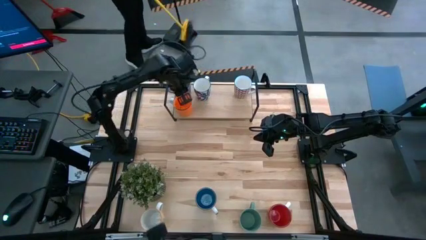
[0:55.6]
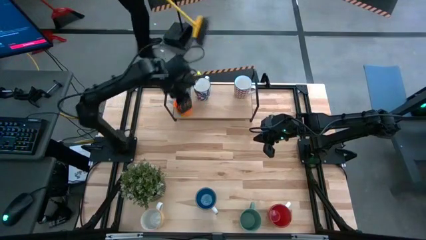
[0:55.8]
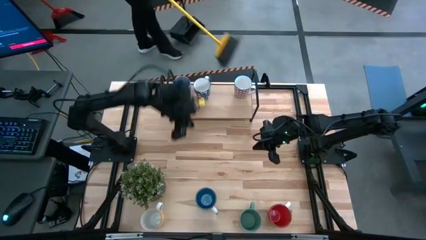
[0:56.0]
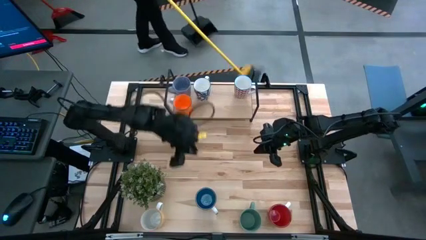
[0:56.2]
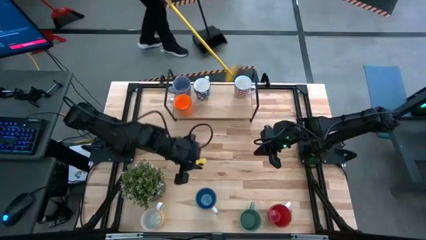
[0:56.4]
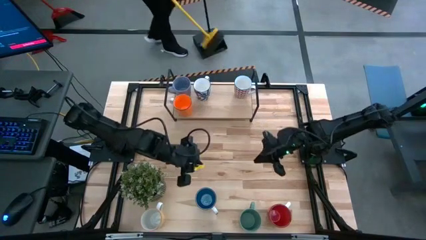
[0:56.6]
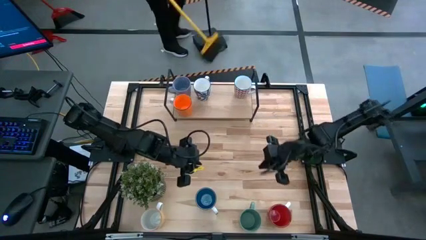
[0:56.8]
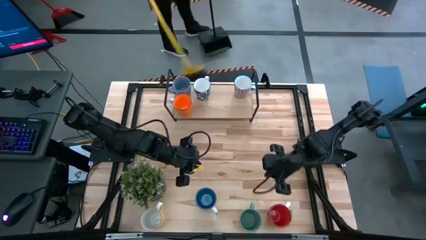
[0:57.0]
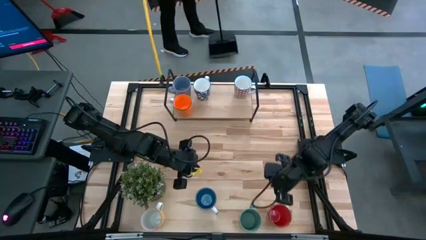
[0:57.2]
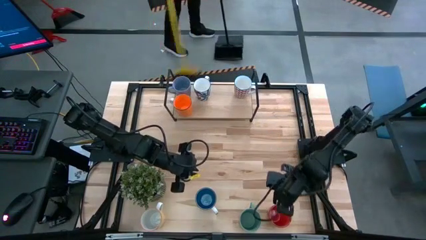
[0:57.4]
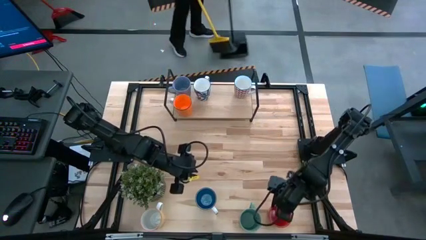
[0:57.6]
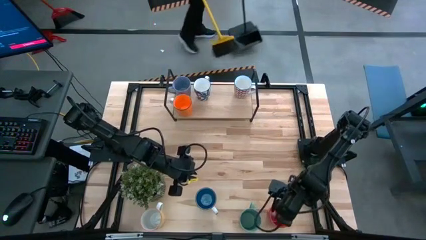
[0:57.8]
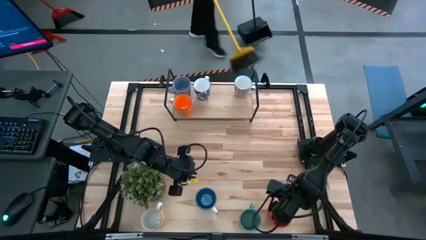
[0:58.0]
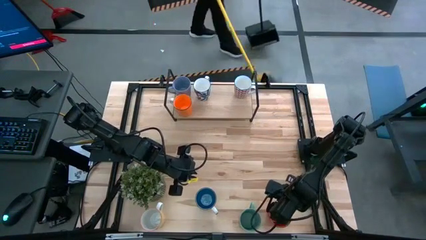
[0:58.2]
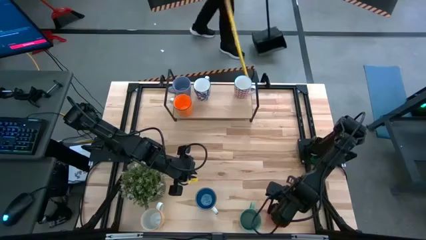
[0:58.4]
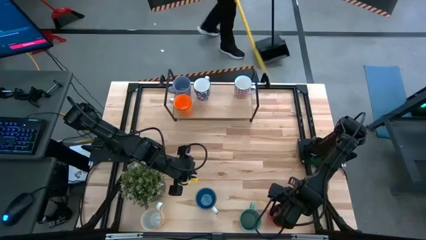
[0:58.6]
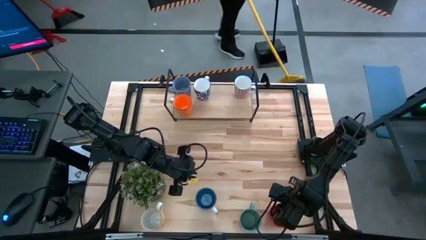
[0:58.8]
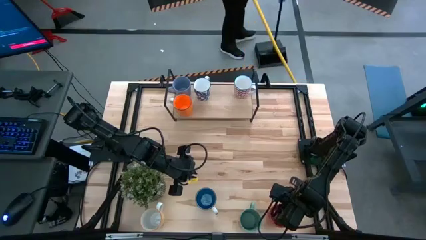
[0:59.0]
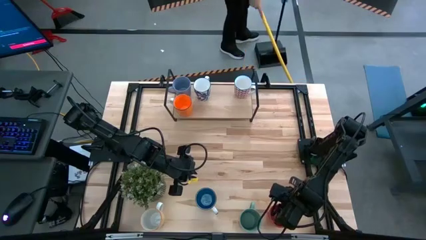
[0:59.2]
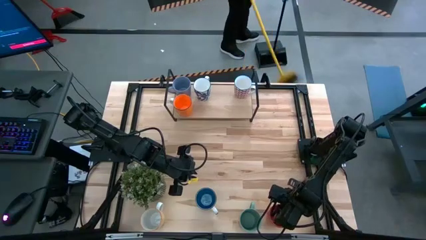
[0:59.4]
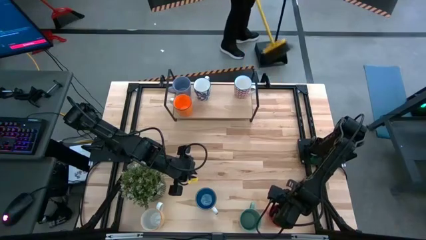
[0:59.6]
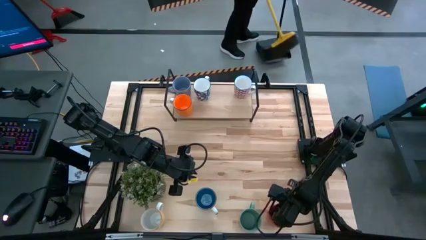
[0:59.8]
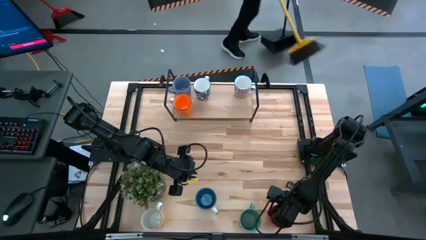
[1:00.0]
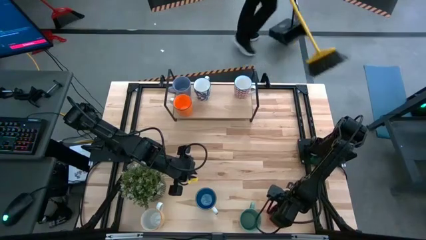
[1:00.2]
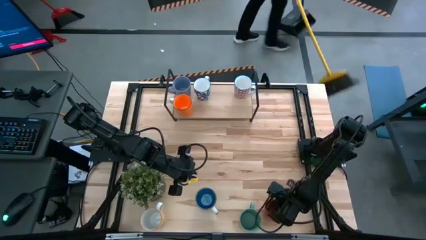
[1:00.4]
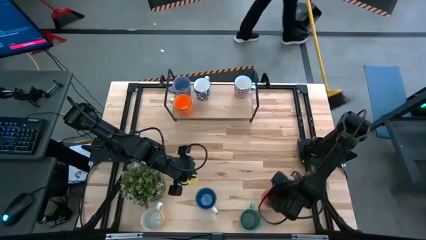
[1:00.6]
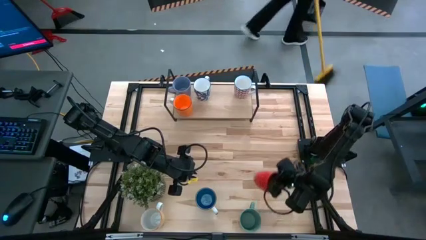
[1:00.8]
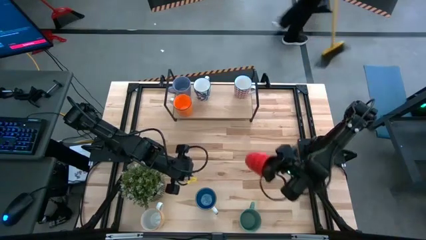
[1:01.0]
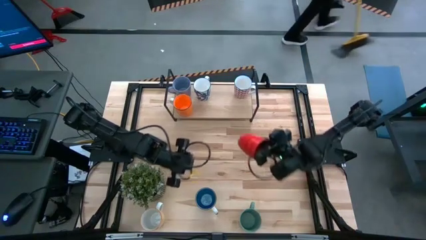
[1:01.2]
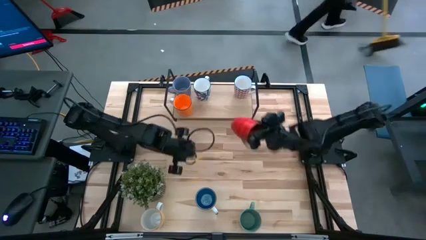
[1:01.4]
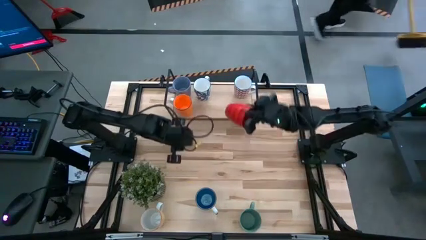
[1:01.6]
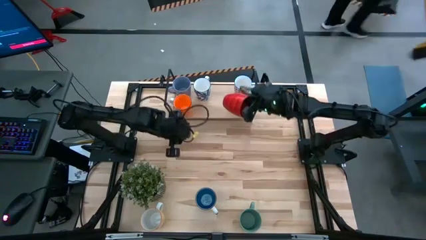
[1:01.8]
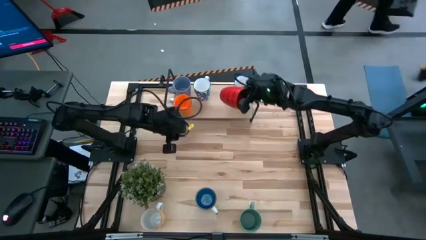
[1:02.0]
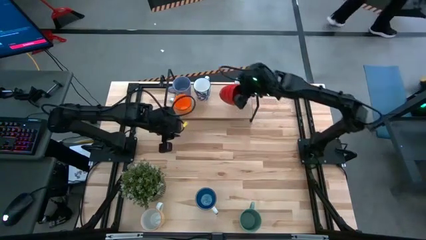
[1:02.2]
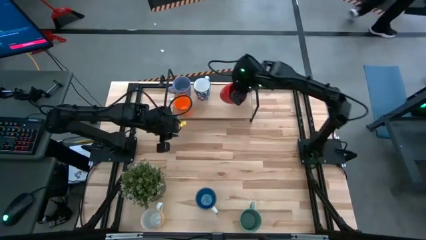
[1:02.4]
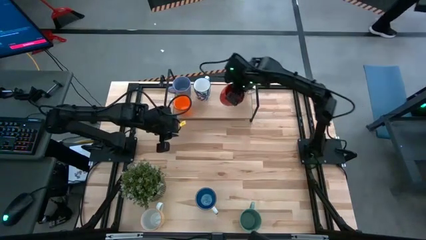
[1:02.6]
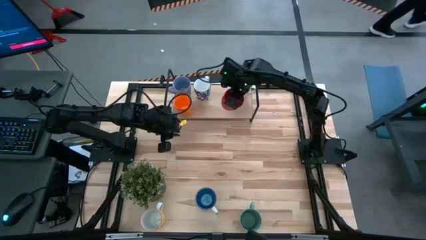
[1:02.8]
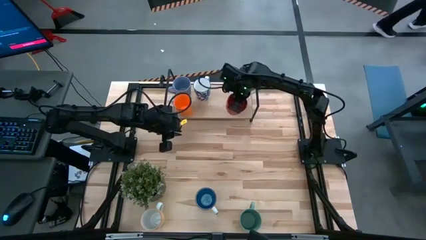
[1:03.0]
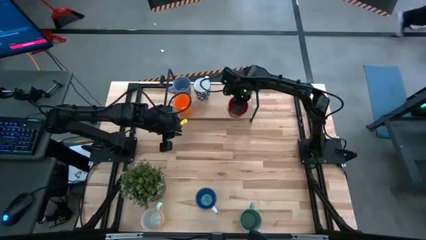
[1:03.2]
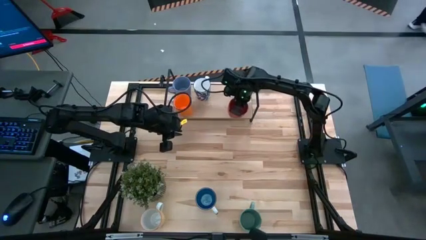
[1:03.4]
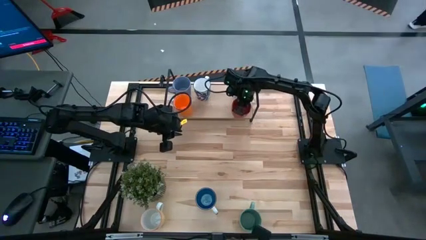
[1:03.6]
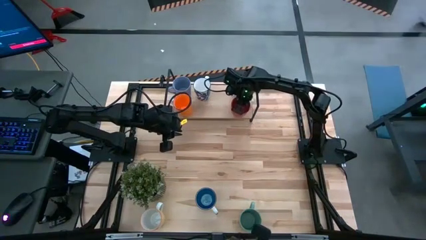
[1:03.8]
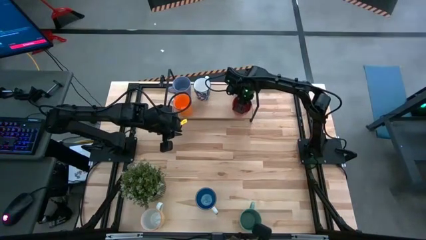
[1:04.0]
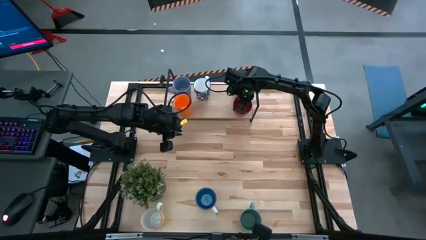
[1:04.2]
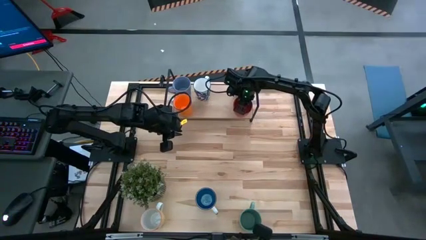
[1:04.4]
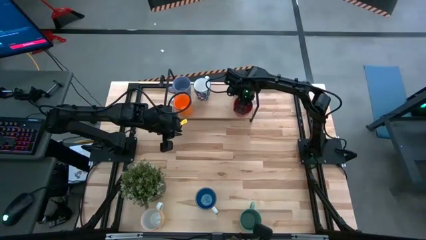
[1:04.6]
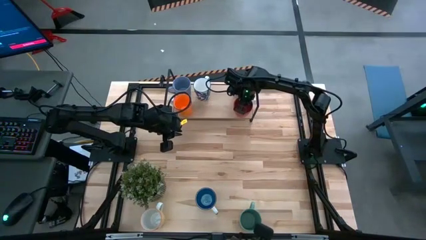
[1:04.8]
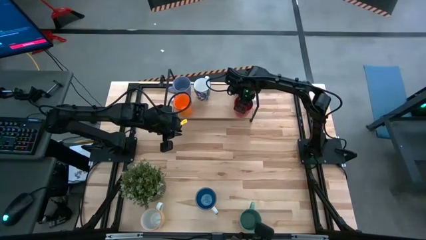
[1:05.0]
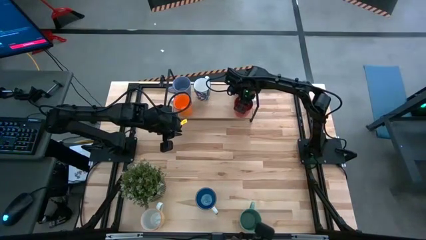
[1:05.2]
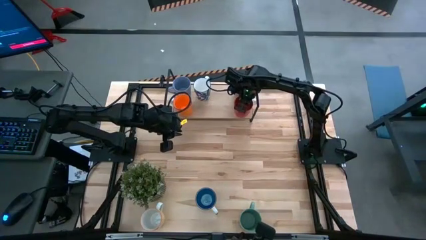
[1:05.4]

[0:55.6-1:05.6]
Task: Place coffee mugs
Put the red mug on the shelf

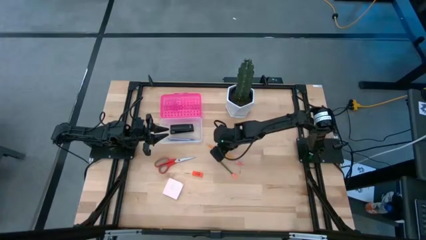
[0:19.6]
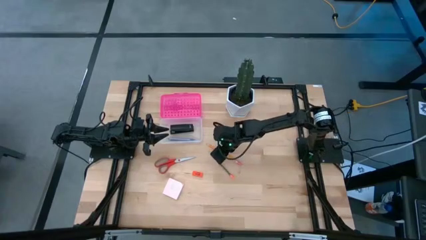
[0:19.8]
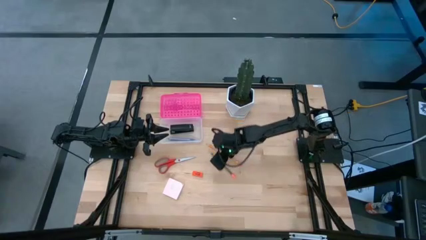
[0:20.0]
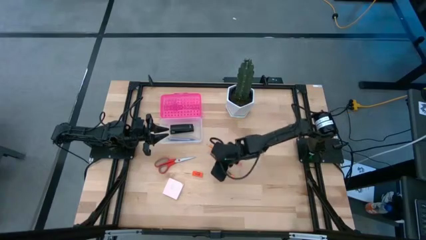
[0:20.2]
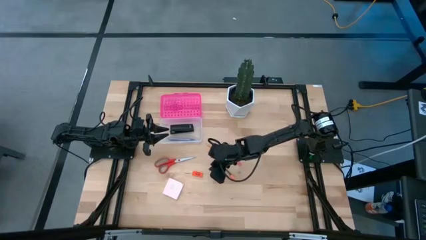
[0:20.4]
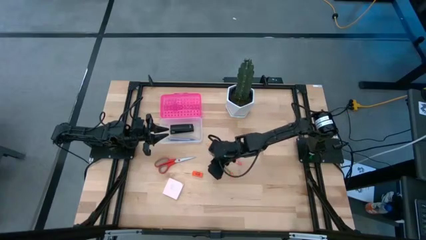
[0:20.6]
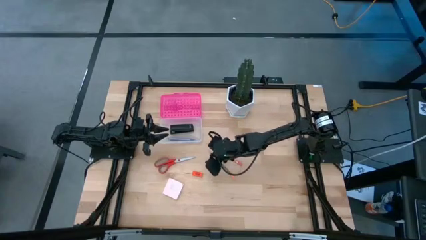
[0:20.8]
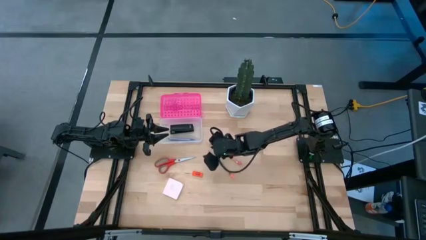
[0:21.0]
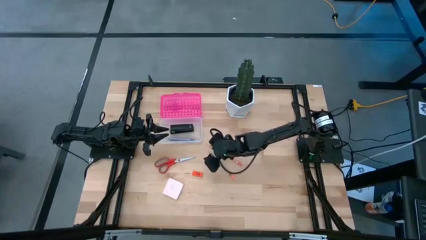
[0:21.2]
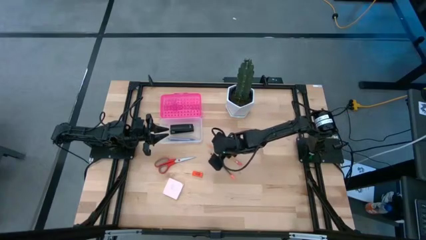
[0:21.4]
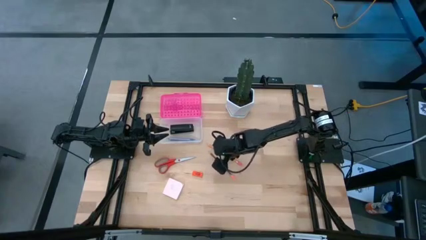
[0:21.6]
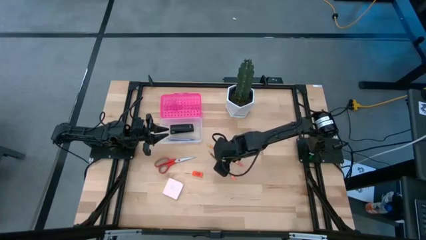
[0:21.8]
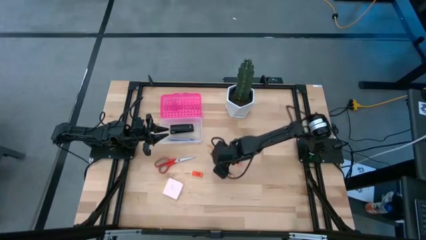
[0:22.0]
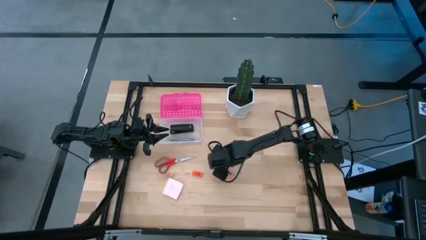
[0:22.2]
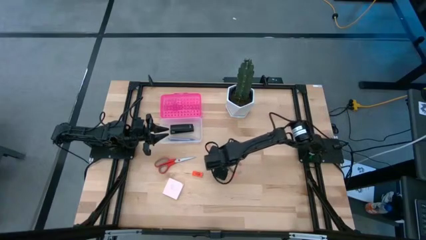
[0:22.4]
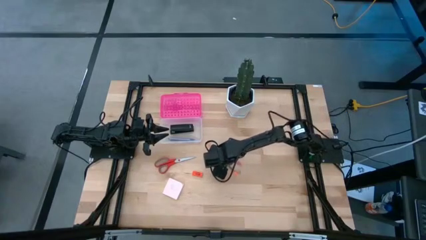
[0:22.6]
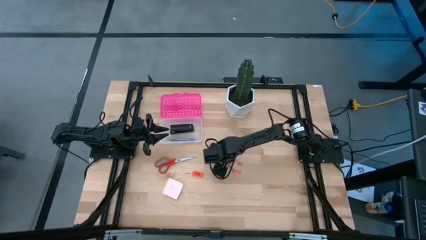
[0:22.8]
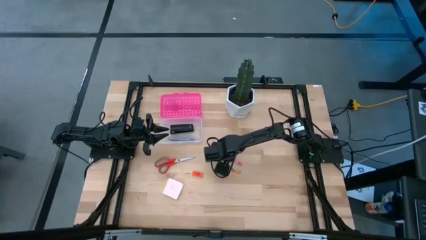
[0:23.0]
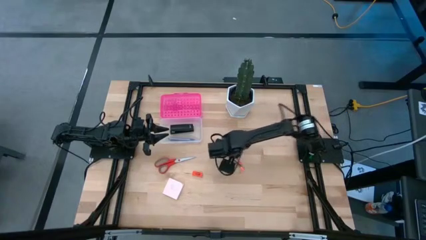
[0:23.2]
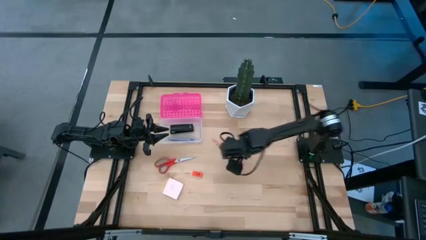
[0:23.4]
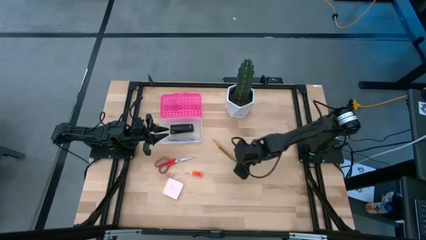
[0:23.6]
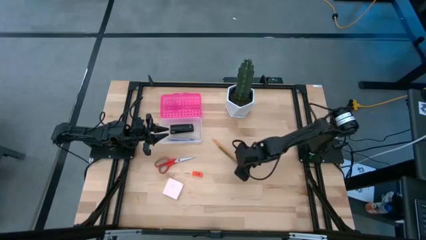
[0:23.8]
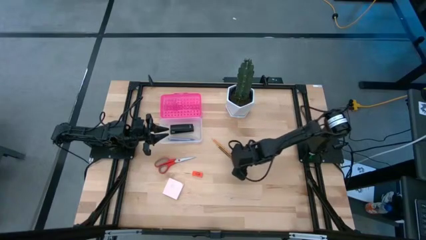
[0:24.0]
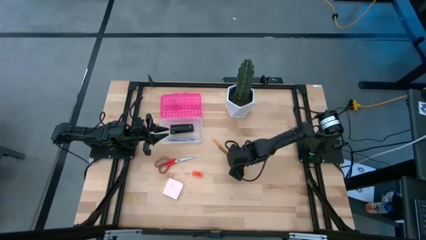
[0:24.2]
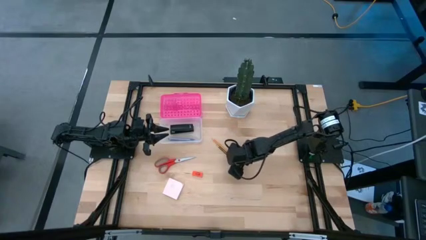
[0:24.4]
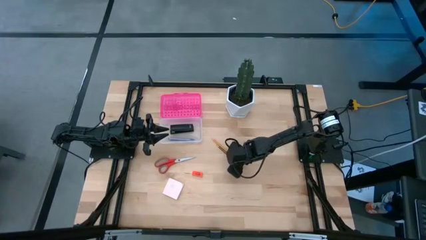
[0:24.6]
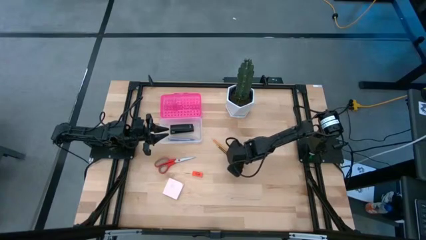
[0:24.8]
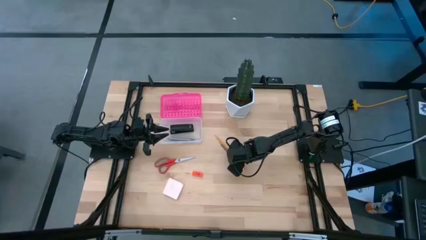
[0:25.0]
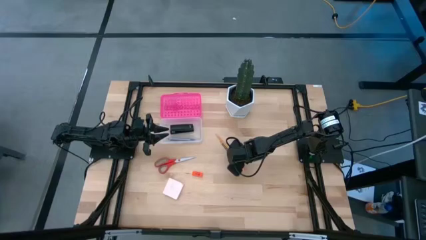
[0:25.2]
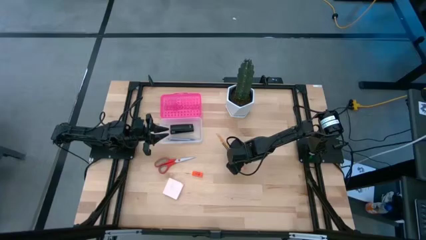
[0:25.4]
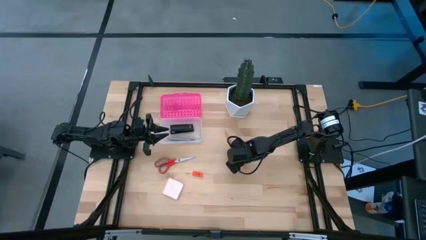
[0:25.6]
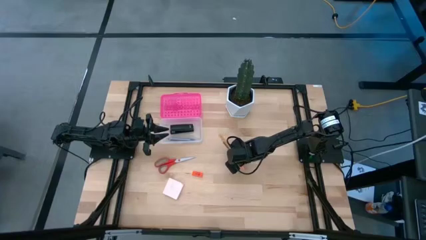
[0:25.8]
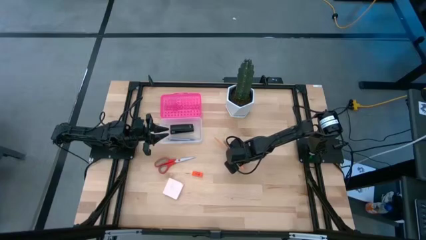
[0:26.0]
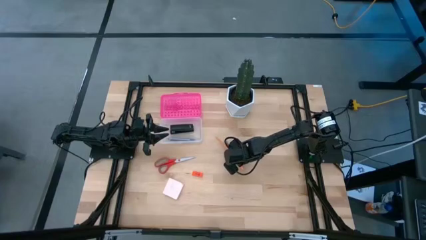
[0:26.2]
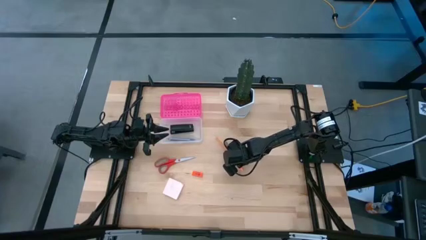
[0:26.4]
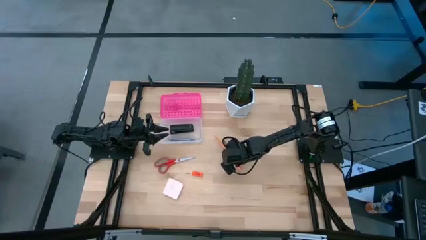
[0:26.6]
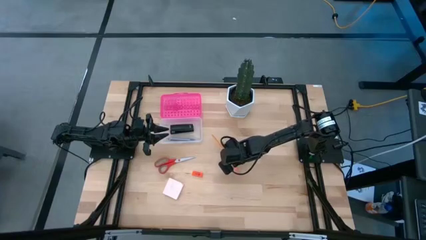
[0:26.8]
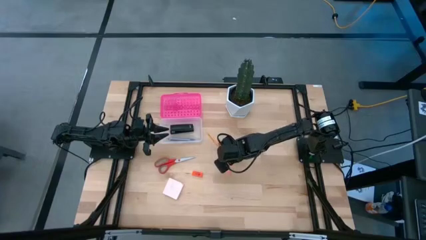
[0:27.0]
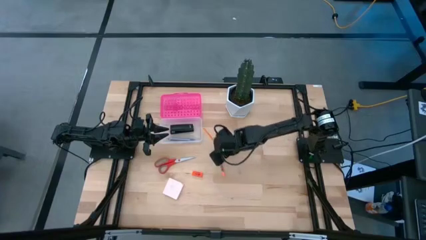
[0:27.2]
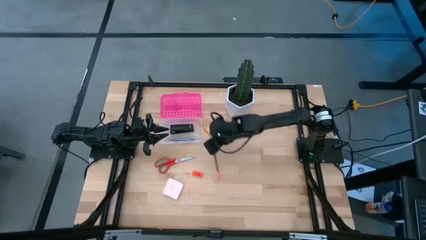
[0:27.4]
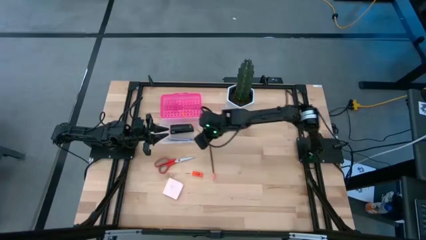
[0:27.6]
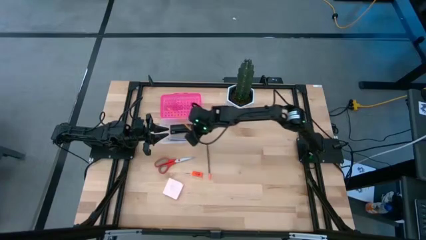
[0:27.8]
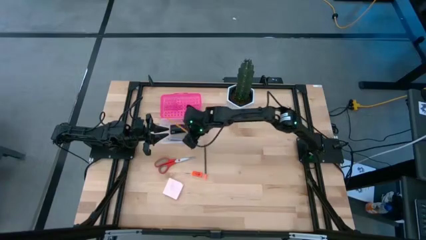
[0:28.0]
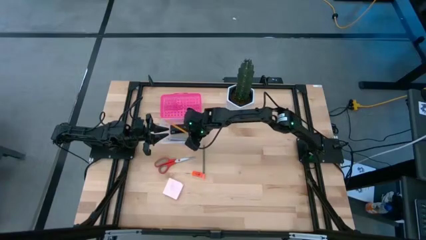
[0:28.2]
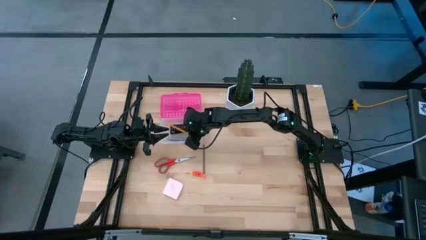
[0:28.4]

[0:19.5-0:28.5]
Task: Pack school essentials
Put the yellow pencil into the supply box
